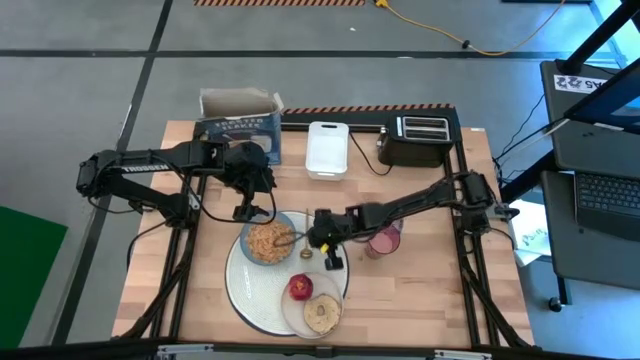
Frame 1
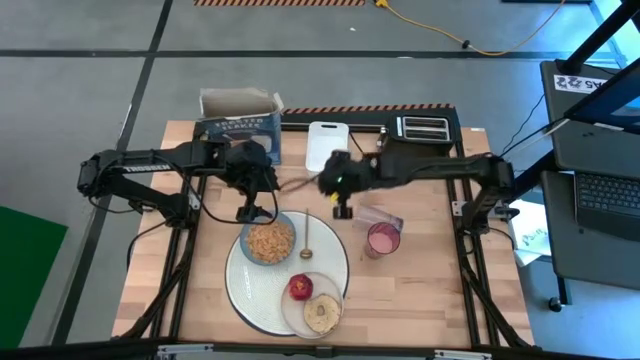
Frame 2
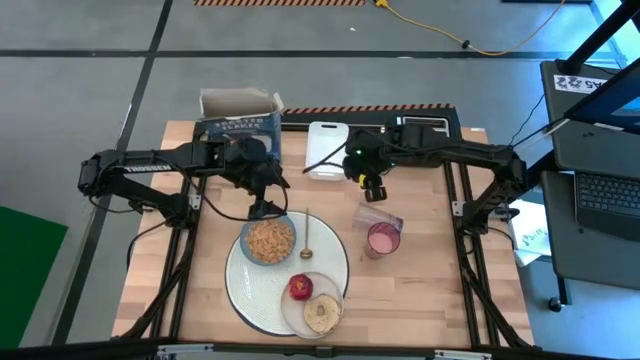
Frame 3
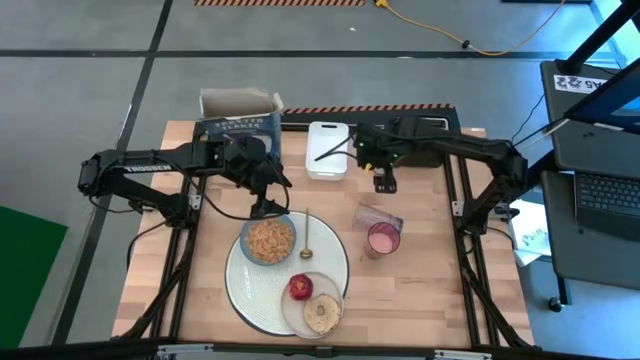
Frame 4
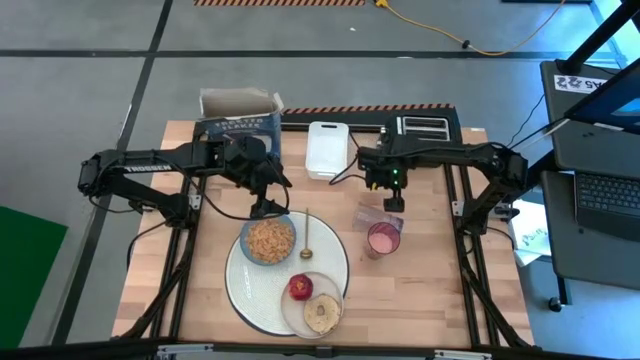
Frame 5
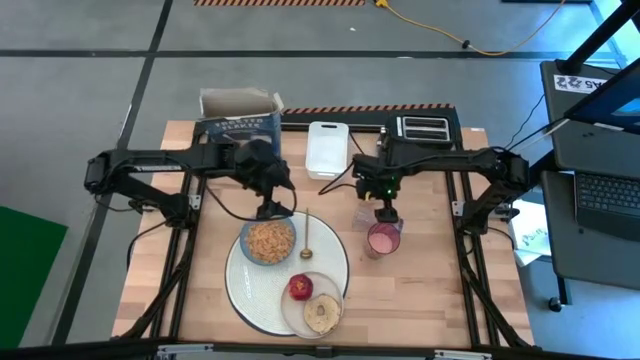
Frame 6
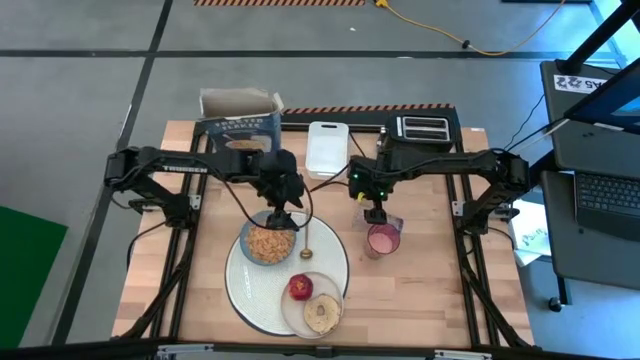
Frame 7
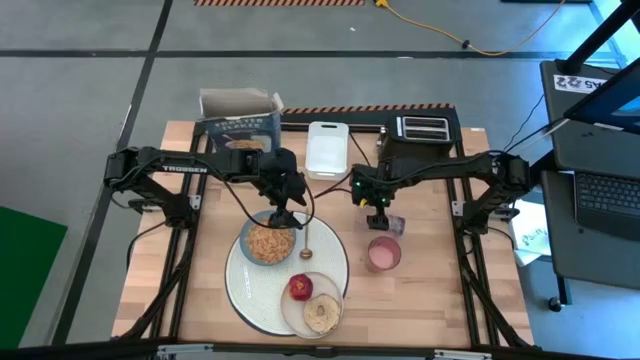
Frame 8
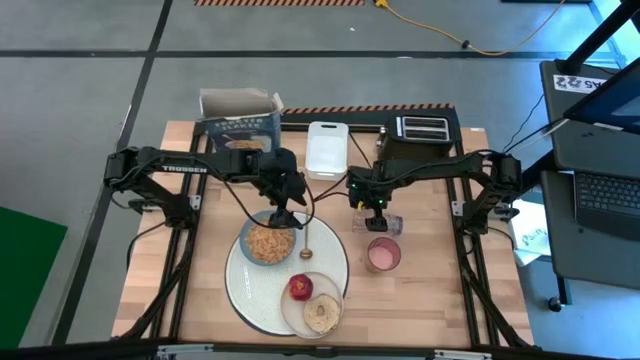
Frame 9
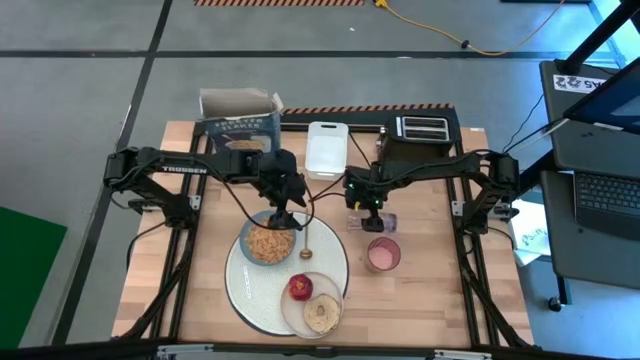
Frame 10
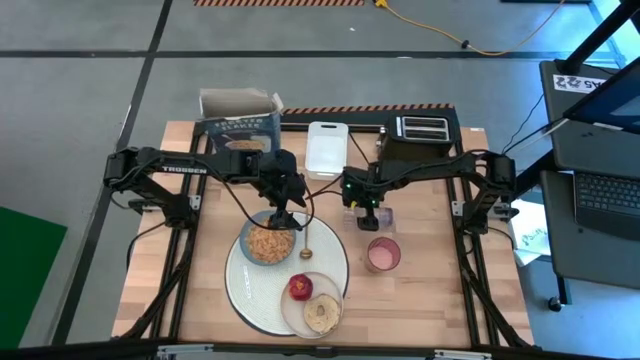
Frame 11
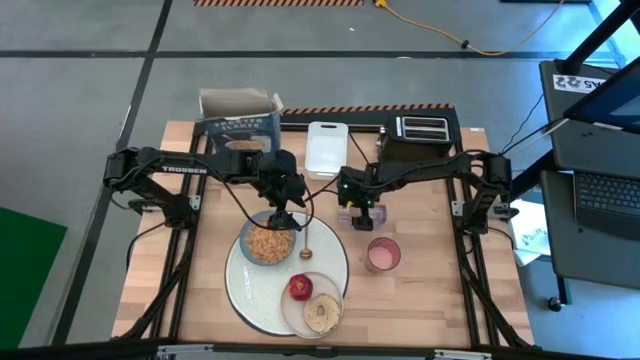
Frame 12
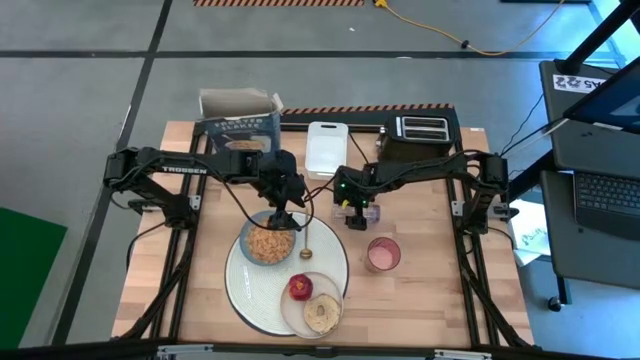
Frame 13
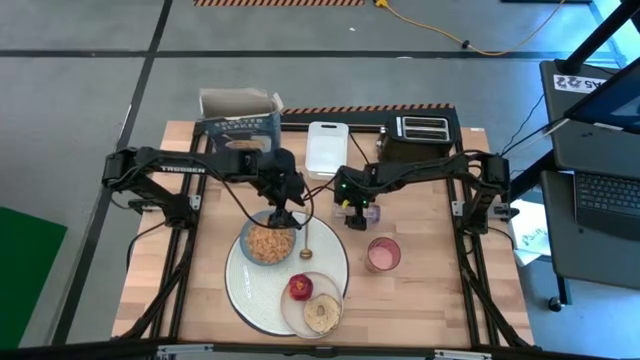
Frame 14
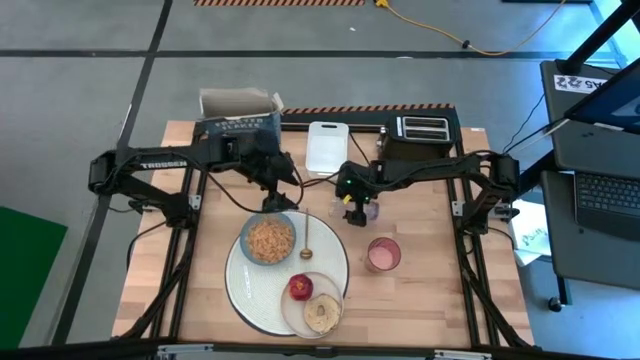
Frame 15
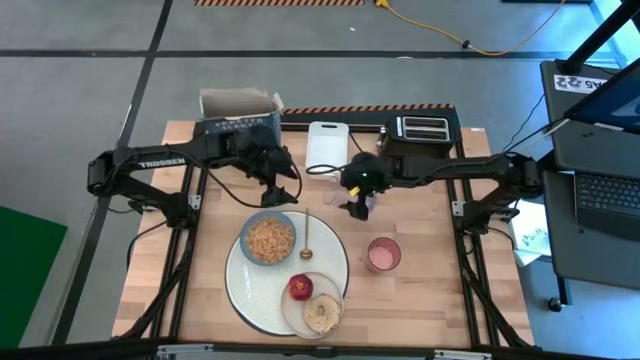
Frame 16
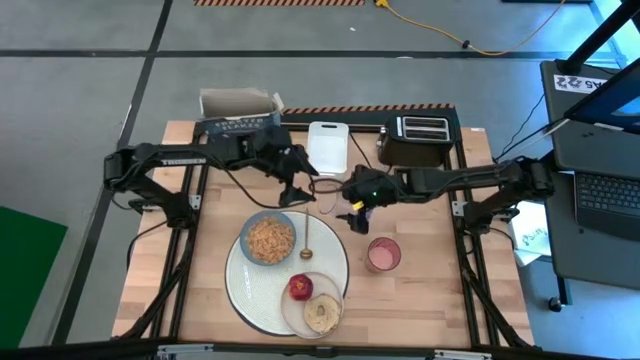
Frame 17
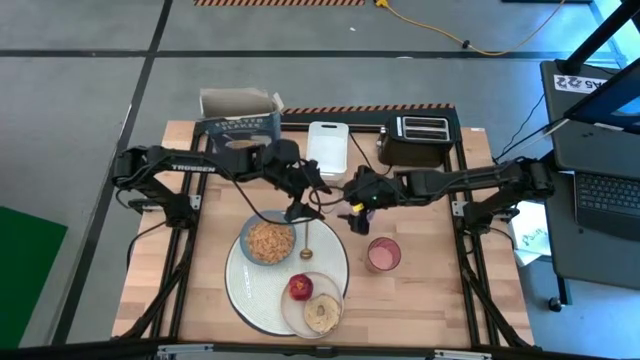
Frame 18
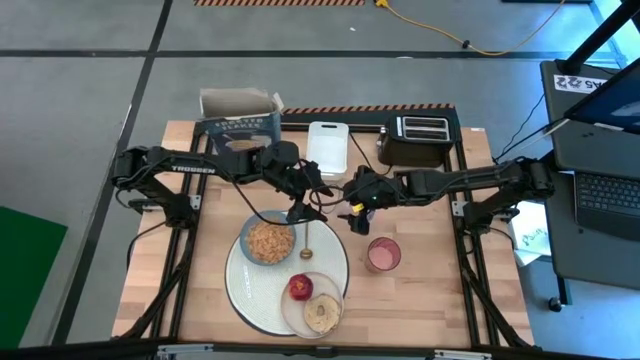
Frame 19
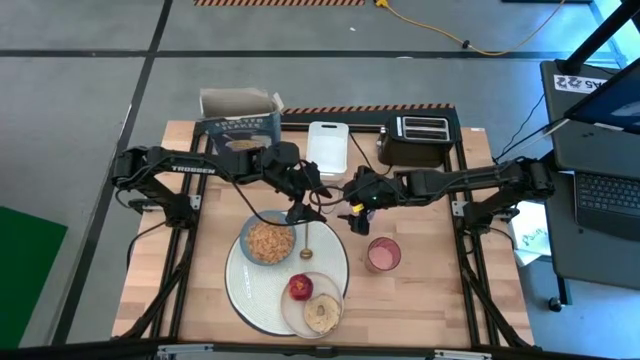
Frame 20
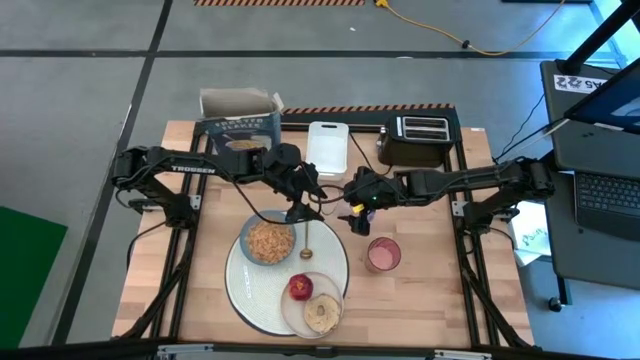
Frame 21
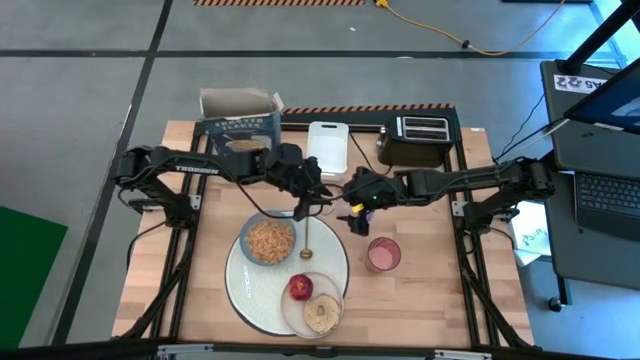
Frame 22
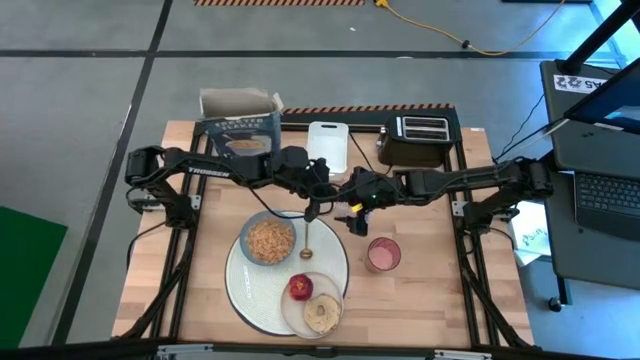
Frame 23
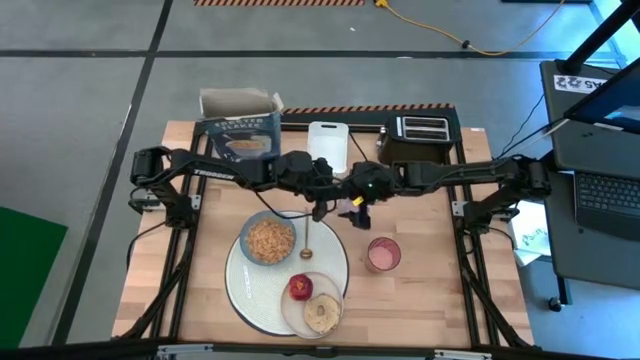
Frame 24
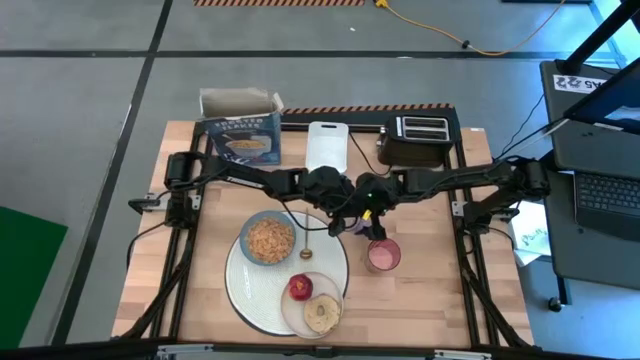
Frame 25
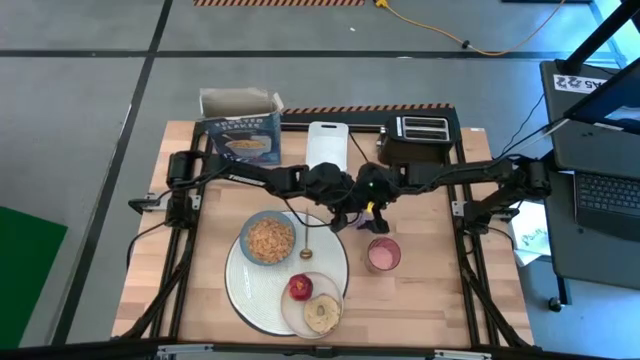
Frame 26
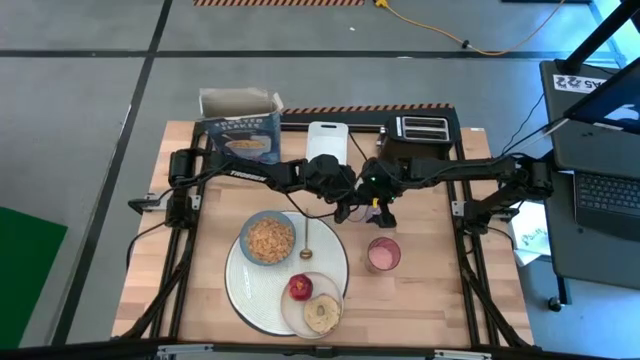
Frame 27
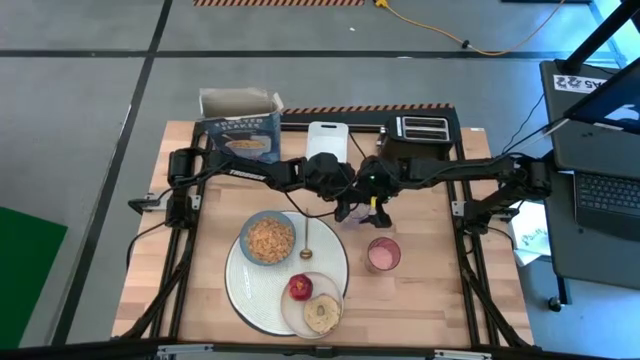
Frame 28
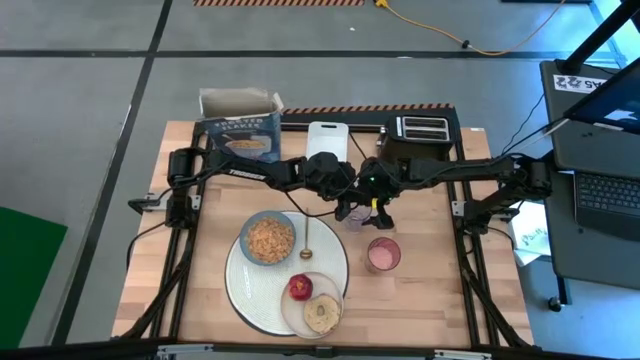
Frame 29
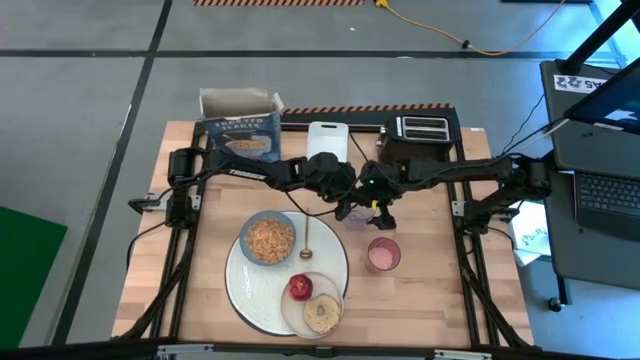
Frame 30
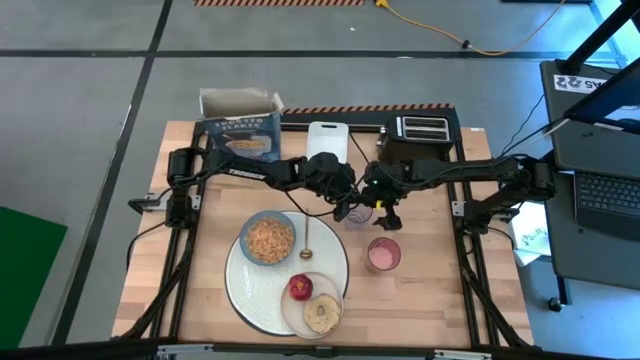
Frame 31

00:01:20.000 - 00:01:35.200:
Task: Arrange a breakfast setting
Adjust the transparent cup

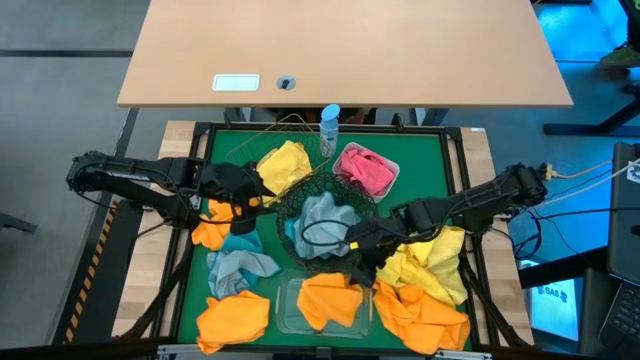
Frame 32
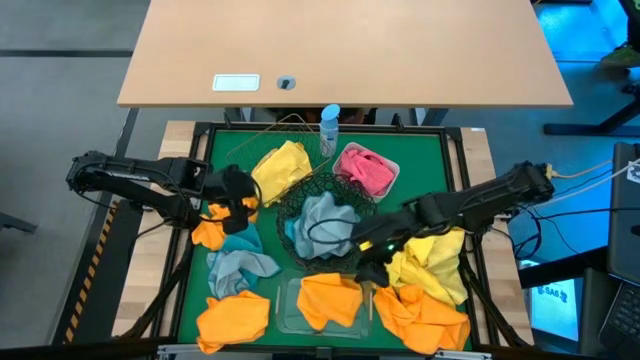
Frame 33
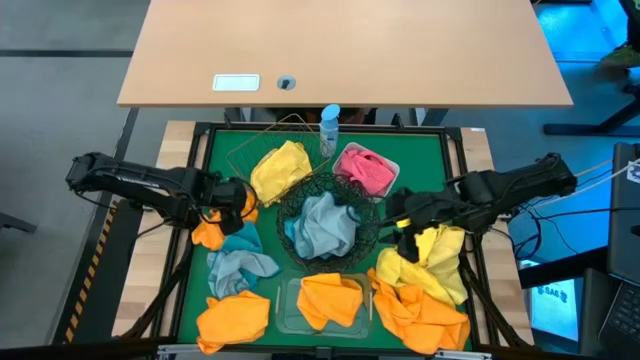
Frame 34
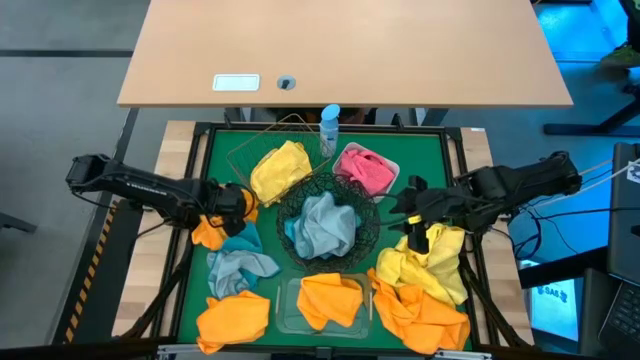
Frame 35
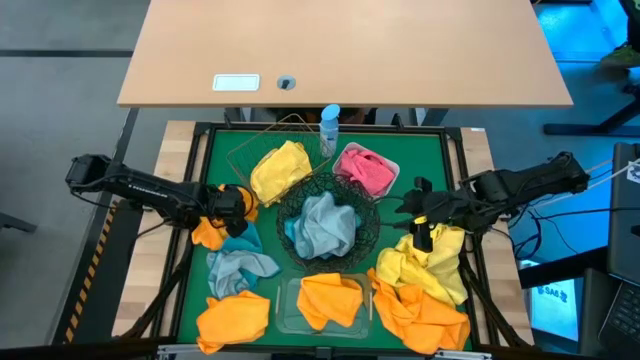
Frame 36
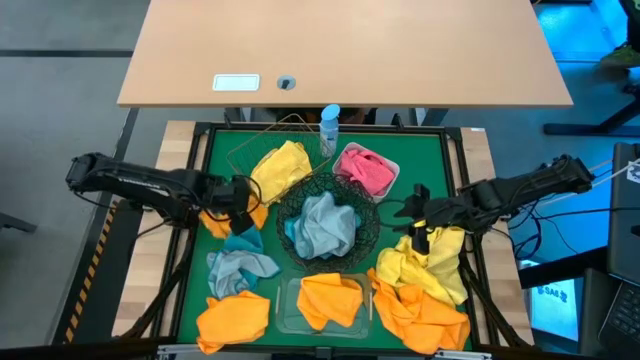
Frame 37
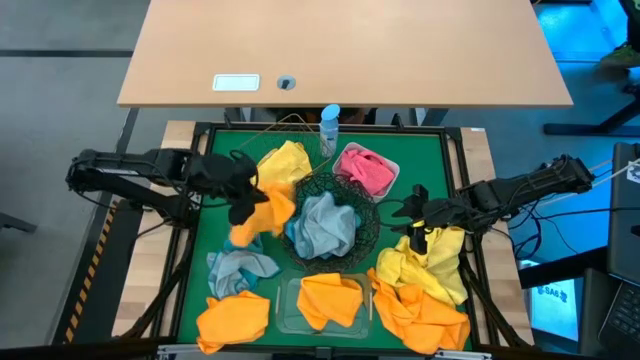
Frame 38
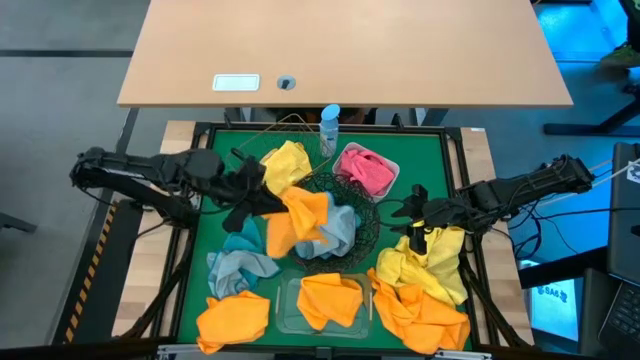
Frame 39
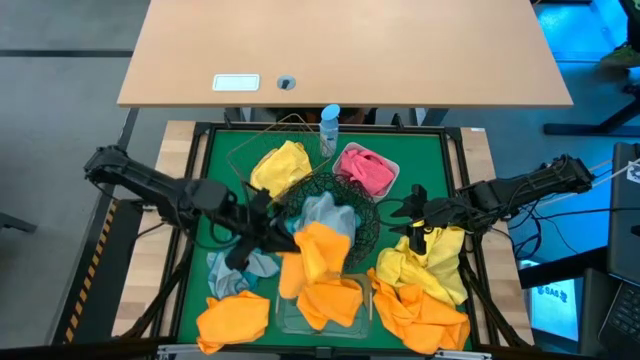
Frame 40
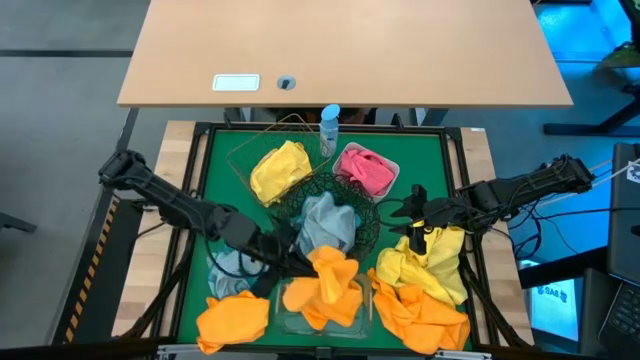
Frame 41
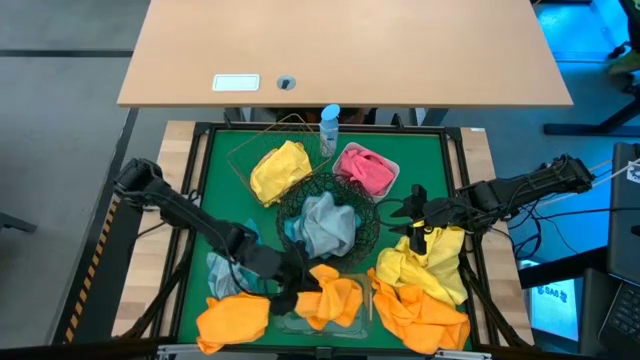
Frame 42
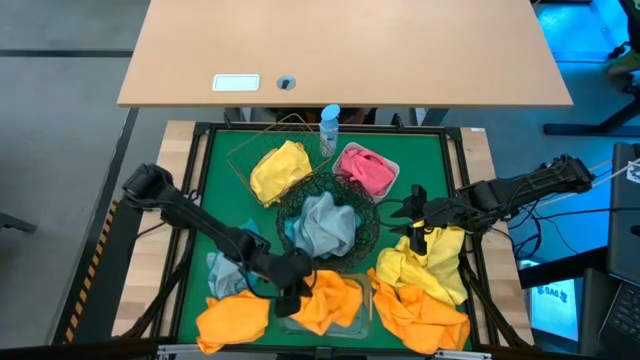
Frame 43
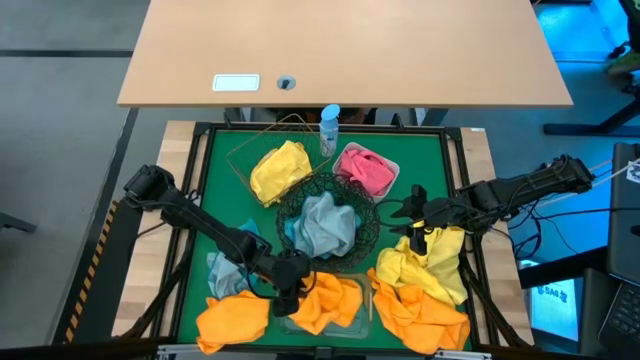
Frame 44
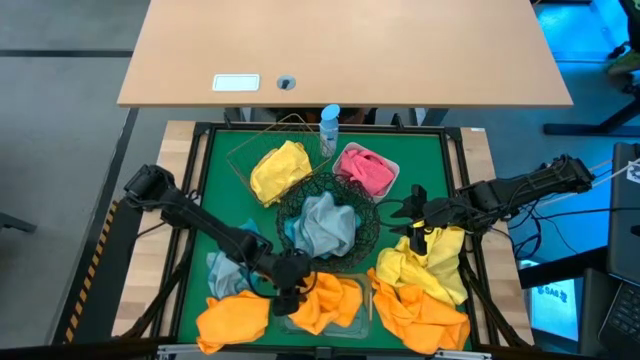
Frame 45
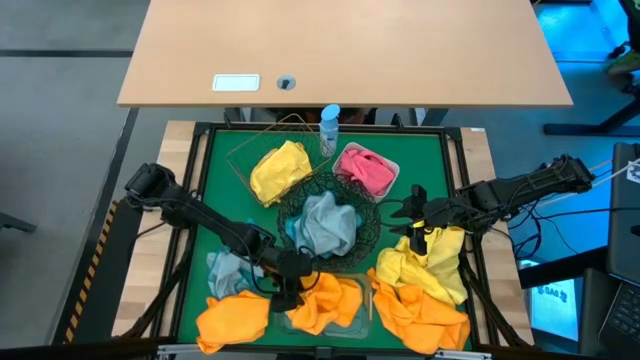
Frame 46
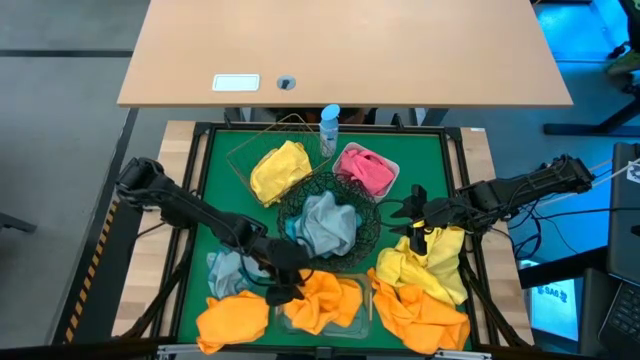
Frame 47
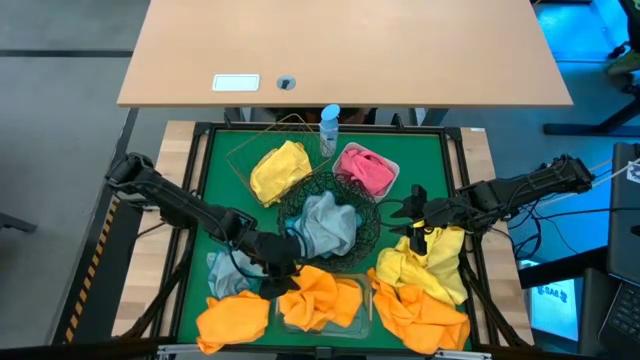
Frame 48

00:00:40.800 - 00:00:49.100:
Task: Sort microfiber towel by color & place in baskets
Put the orange microfiber towel into the transparent bin
